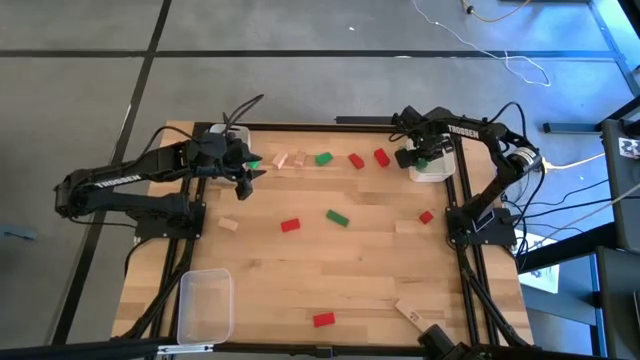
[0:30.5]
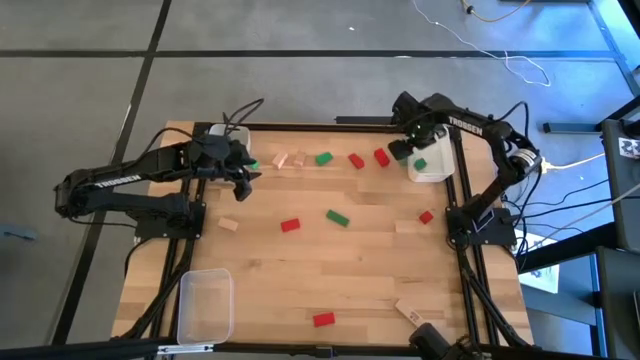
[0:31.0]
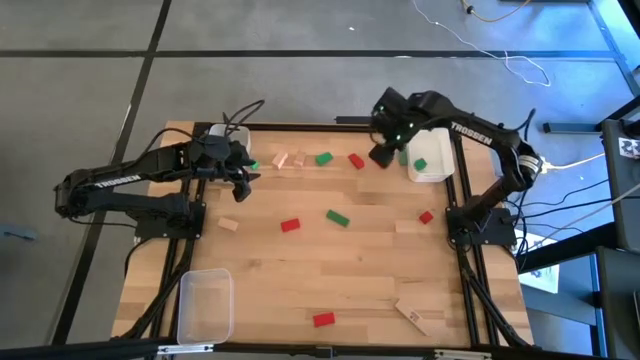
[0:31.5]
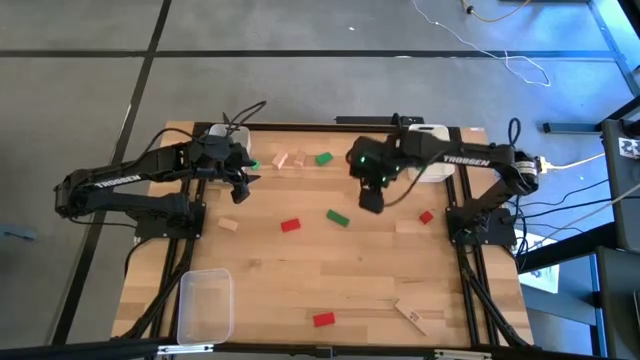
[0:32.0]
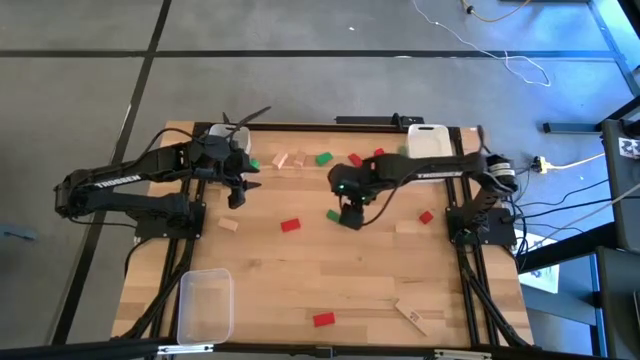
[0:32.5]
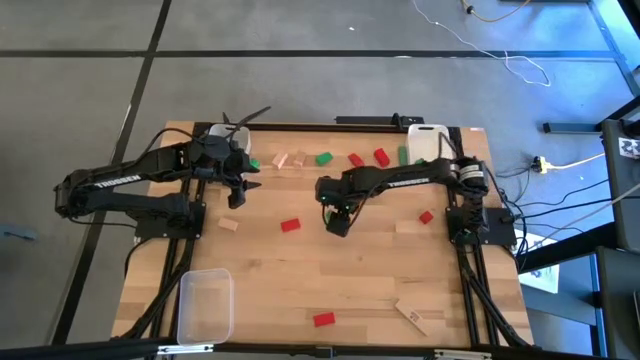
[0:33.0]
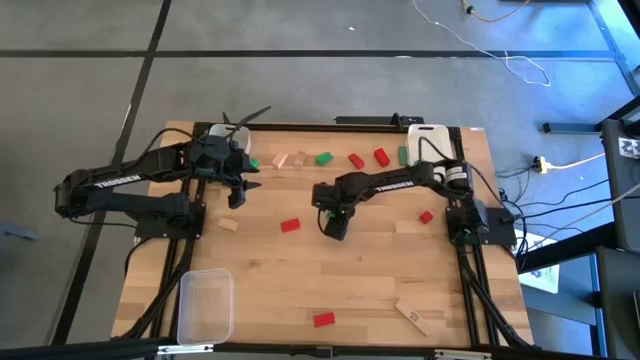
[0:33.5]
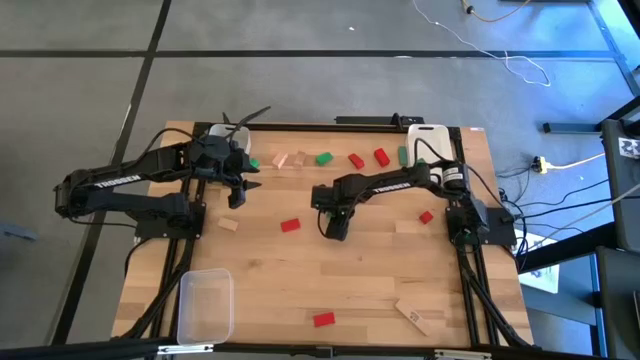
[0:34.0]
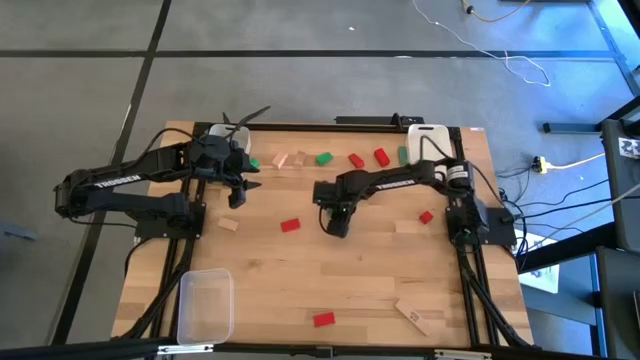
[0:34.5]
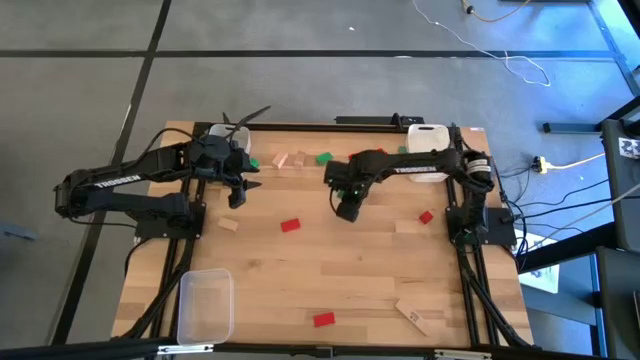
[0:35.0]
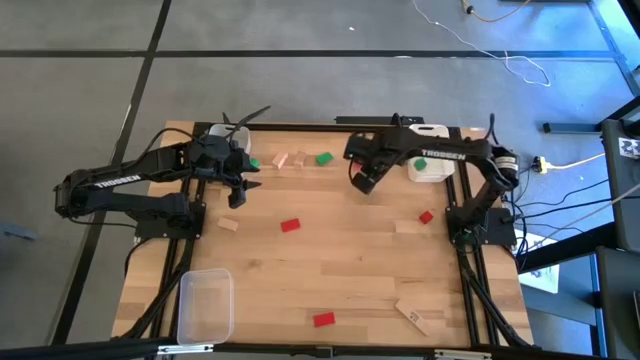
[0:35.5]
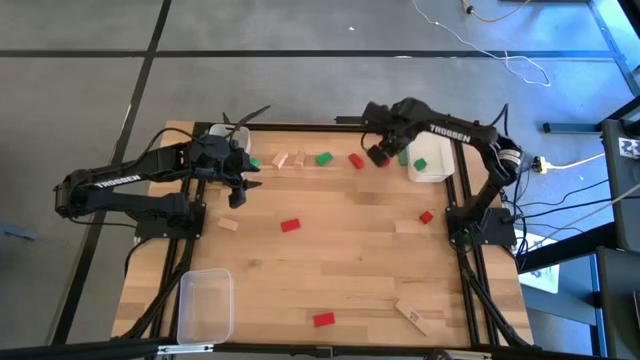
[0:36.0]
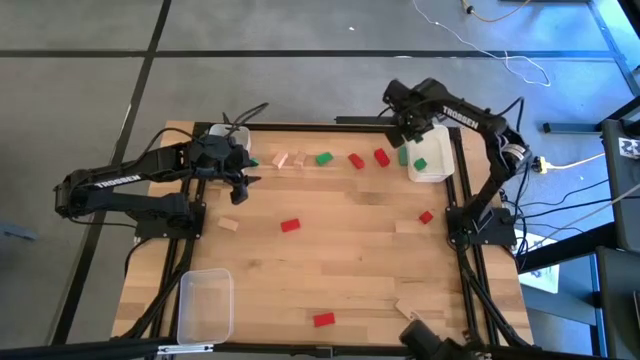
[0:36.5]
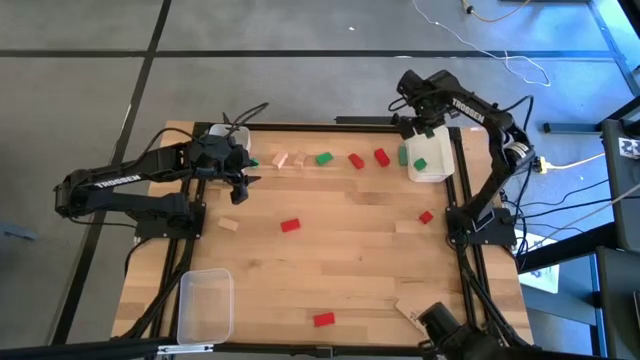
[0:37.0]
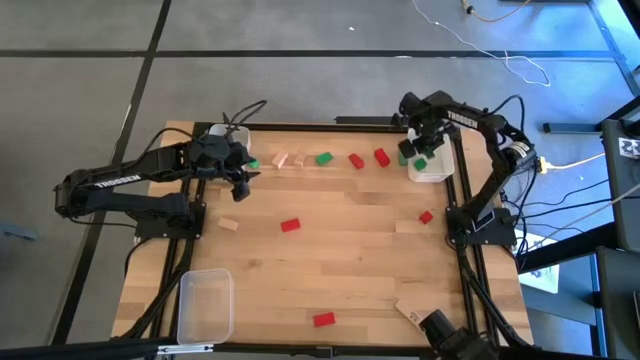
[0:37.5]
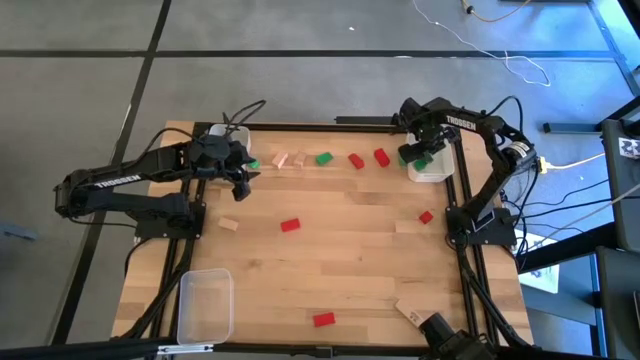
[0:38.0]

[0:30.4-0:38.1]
Task: Sort & place blocks by color
Put the green block into the white bin

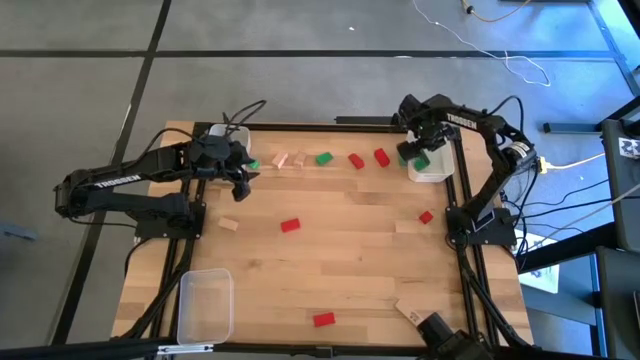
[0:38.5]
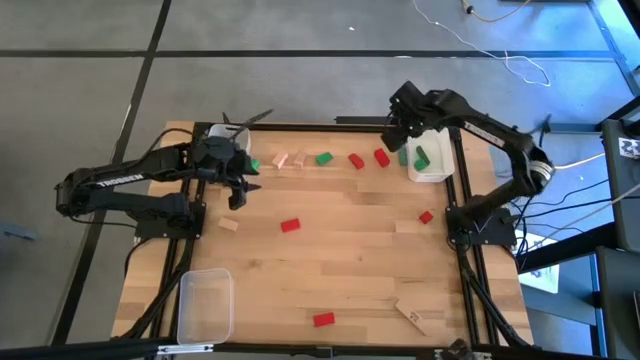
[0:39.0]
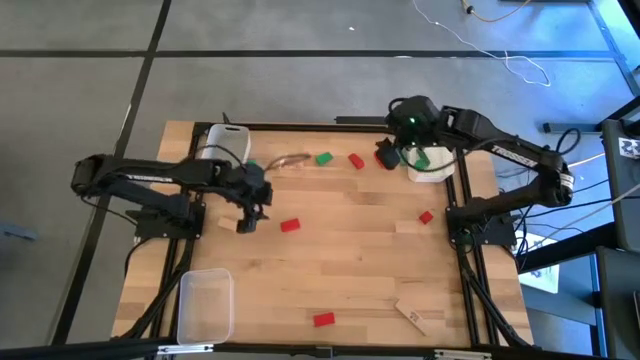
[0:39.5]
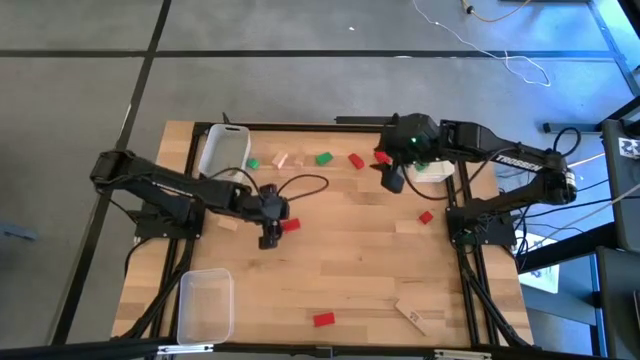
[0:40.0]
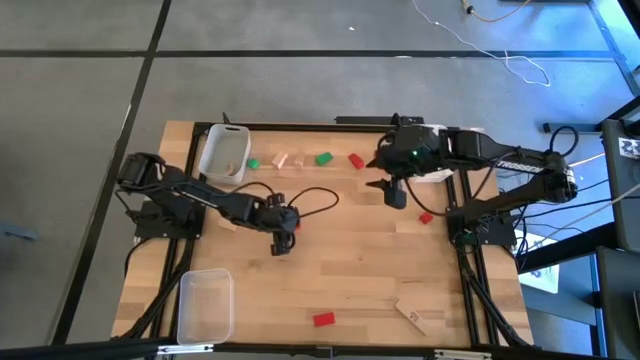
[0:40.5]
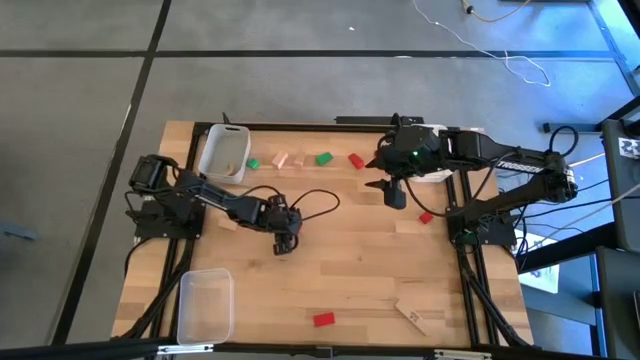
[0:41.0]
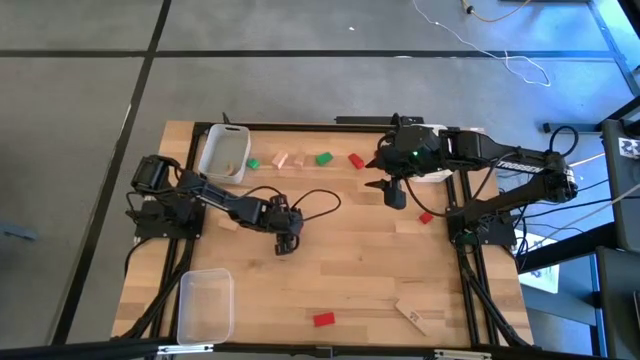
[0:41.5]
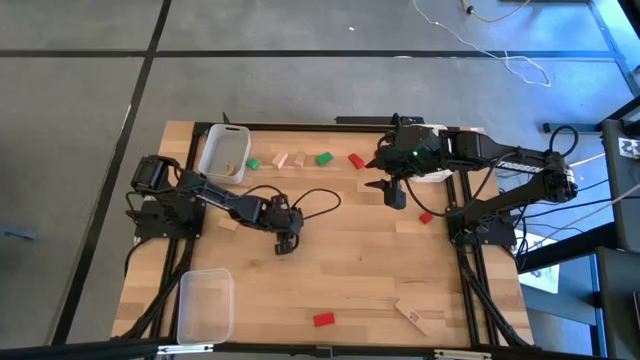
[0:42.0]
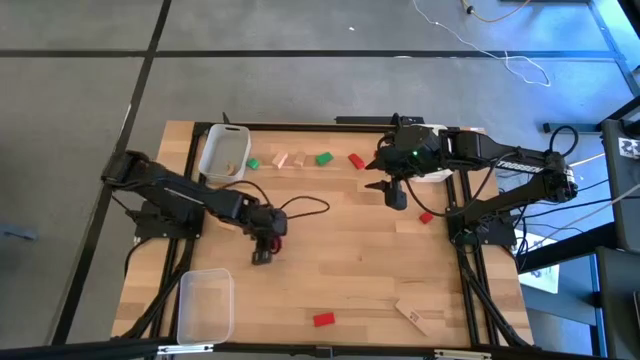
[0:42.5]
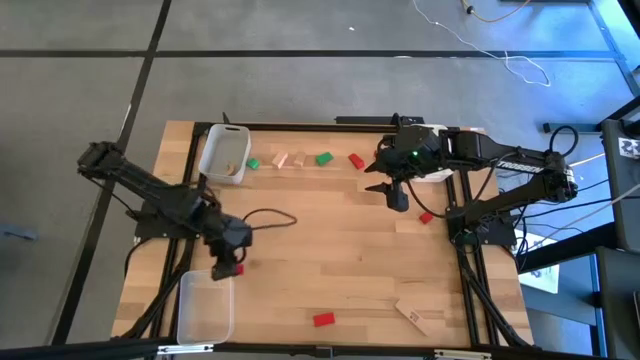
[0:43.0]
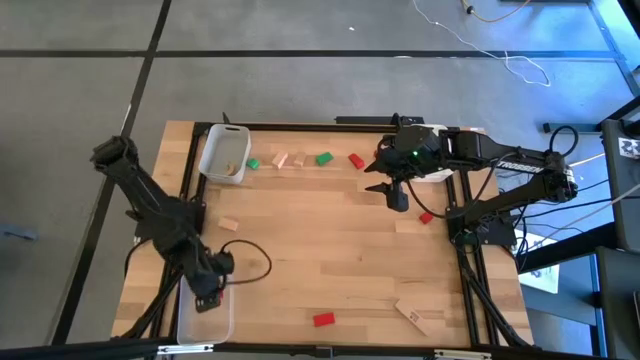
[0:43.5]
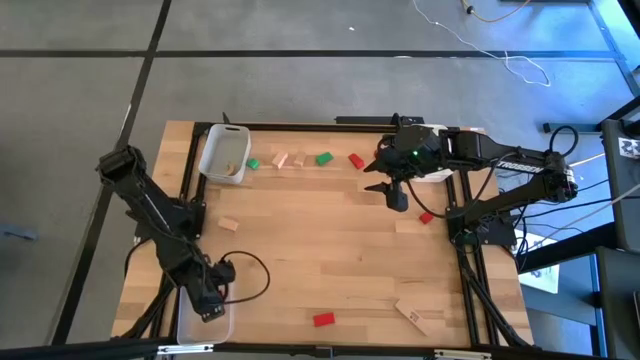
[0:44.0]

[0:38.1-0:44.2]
Put the red block into the transparent bin

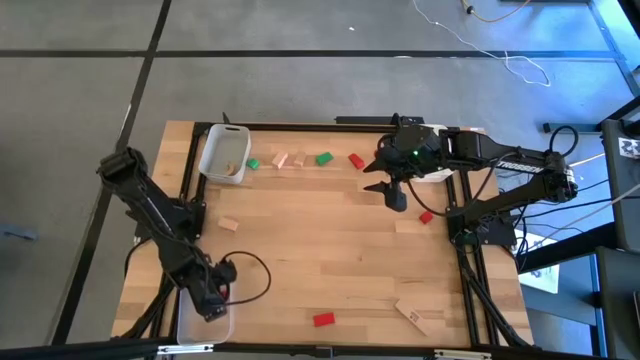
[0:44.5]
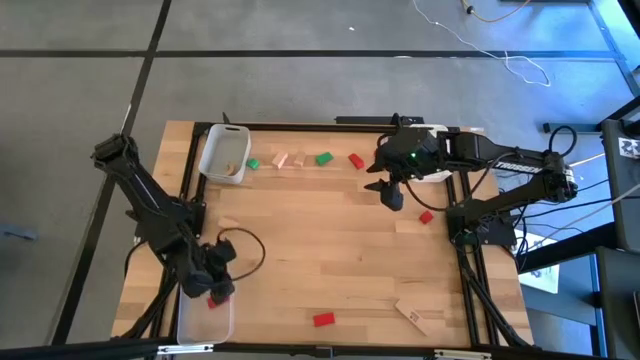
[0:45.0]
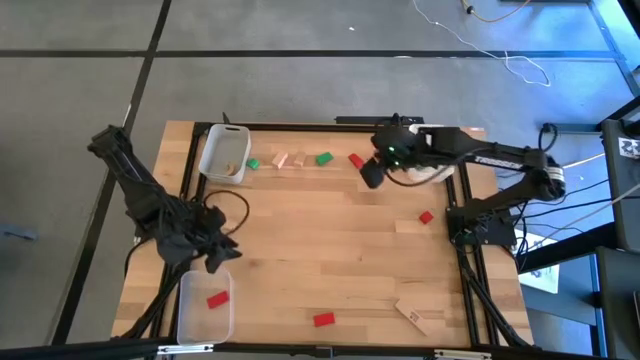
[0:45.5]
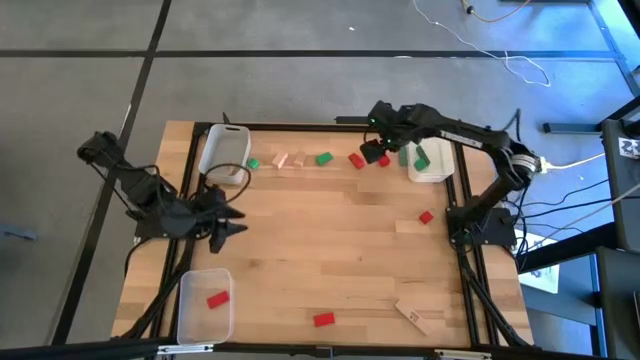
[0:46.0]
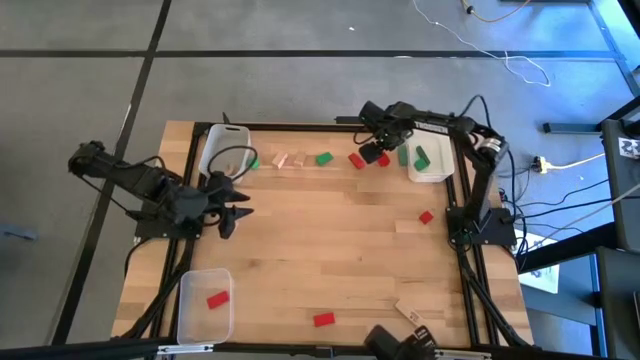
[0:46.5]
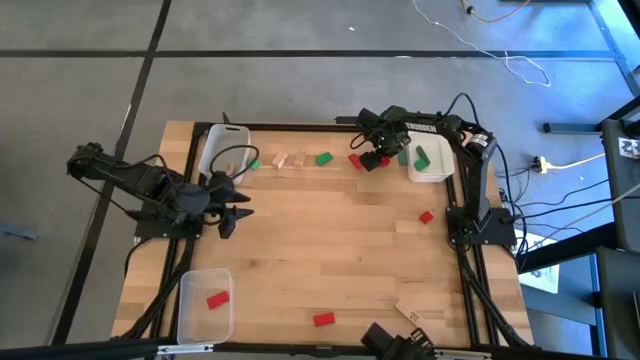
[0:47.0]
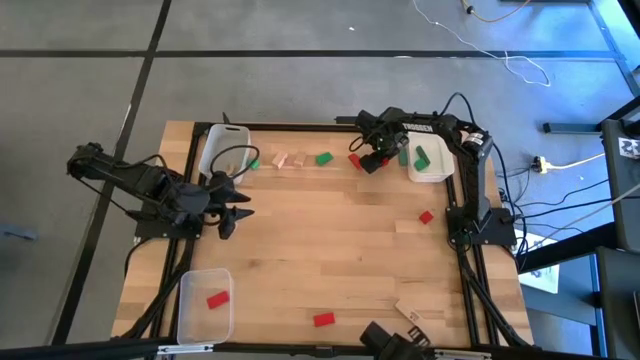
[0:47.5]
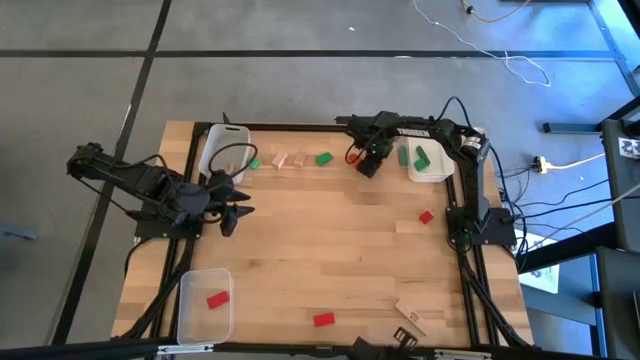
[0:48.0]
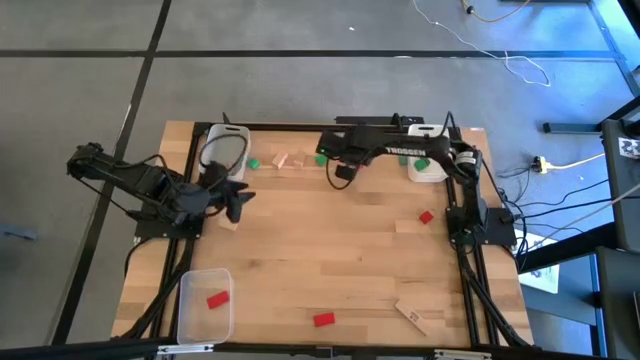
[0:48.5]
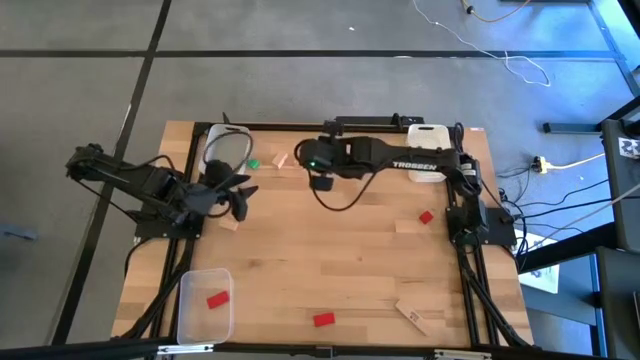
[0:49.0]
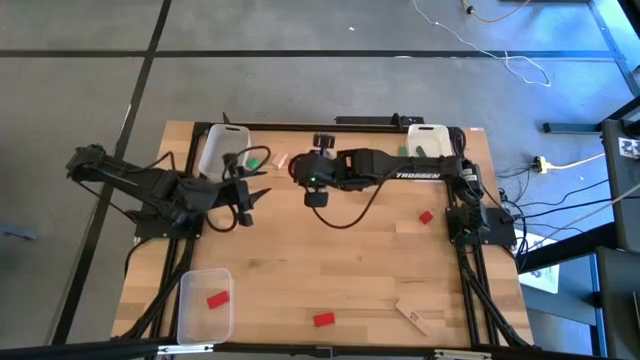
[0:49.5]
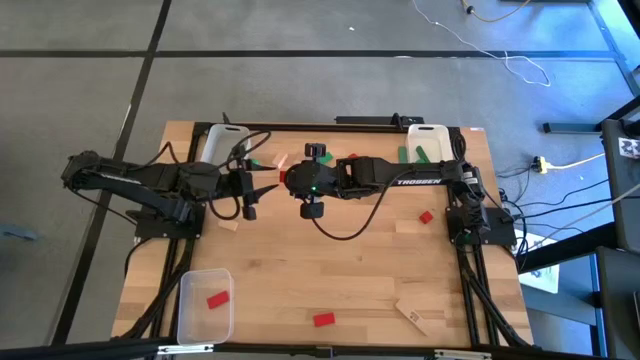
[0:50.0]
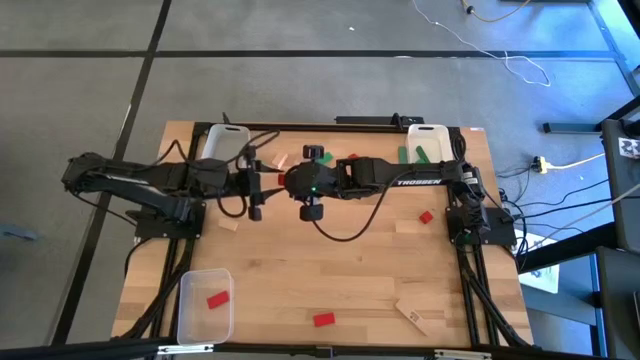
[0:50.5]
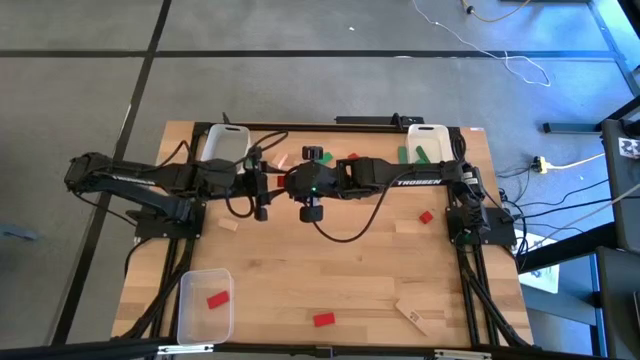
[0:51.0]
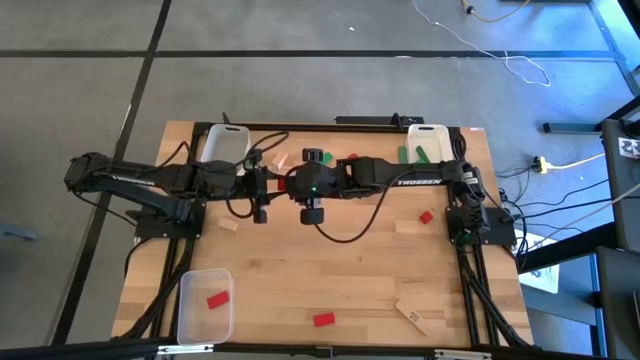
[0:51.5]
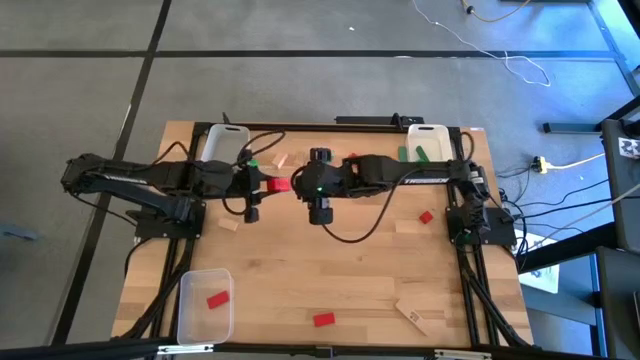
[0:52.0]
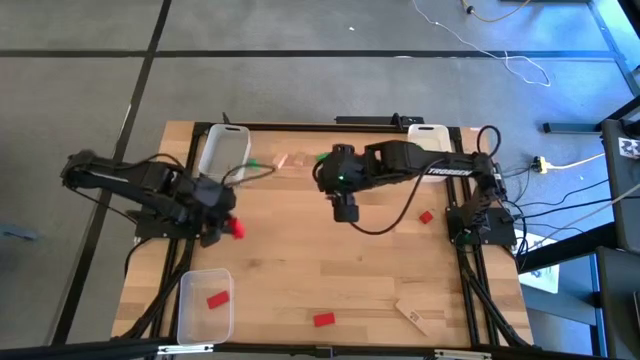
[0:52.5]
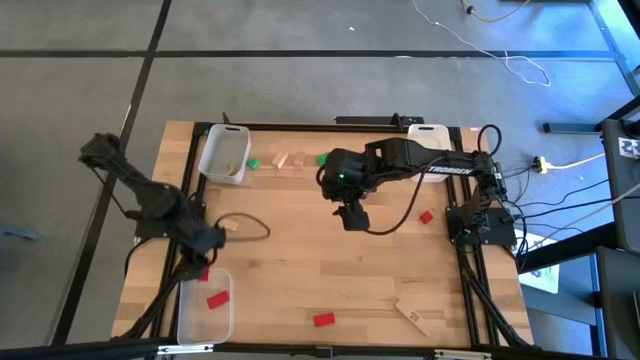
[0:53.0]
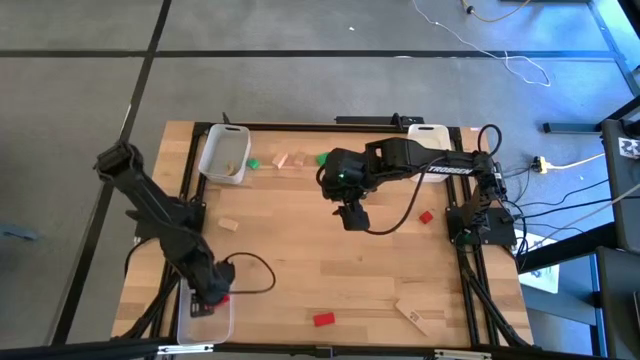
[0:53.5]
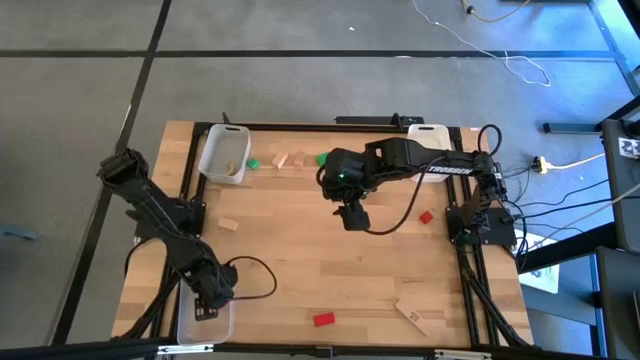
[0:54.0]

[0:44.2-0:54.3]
Put the red block into the transparent bin
